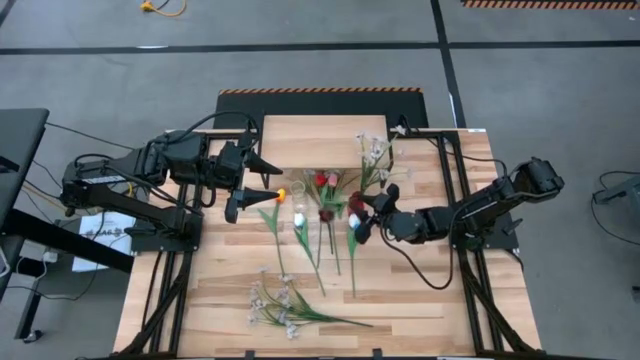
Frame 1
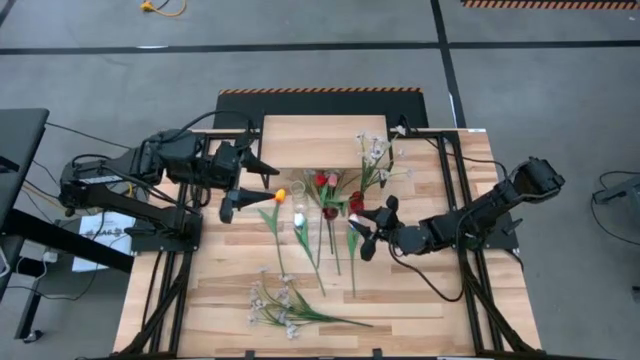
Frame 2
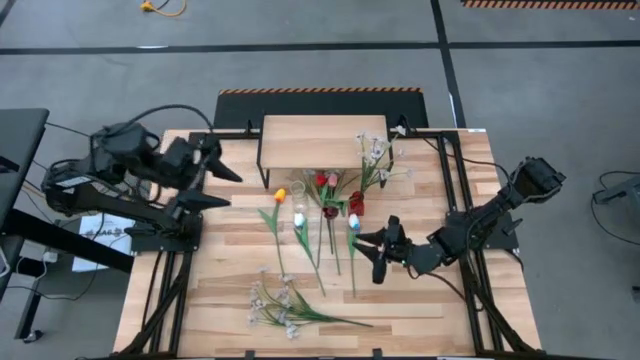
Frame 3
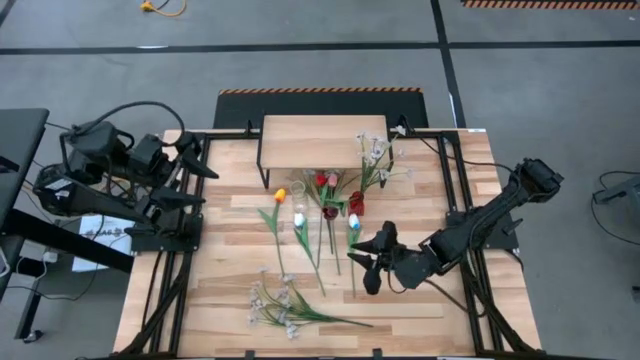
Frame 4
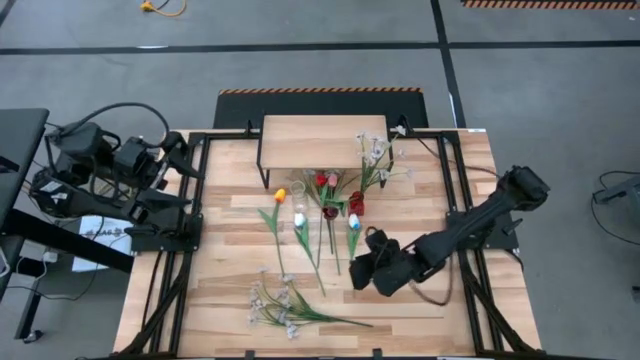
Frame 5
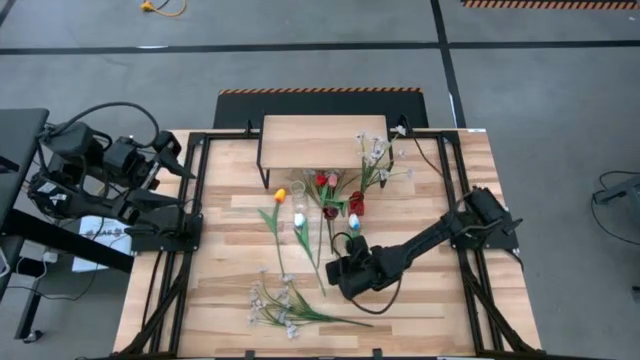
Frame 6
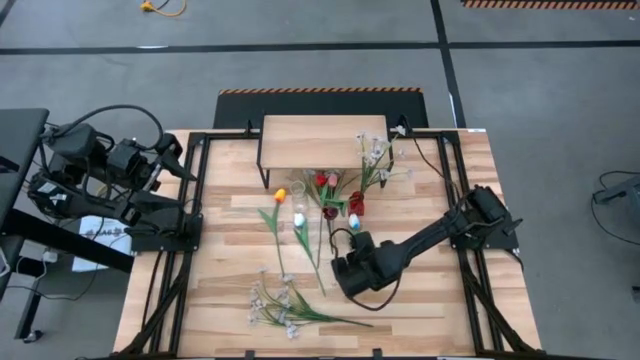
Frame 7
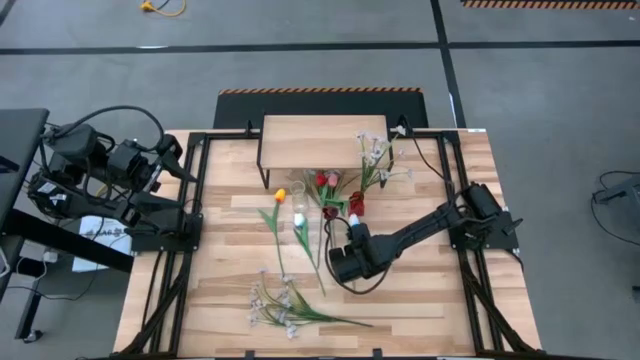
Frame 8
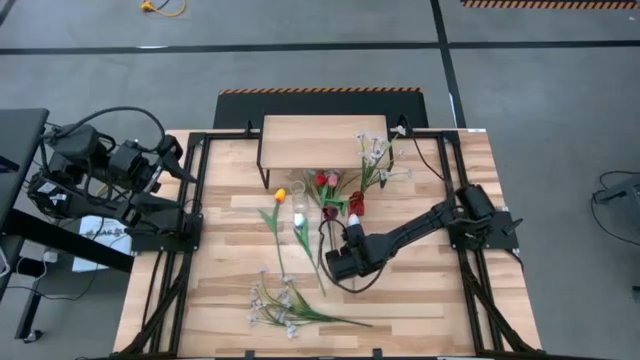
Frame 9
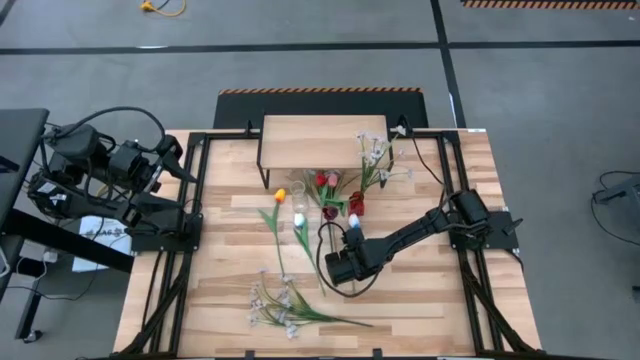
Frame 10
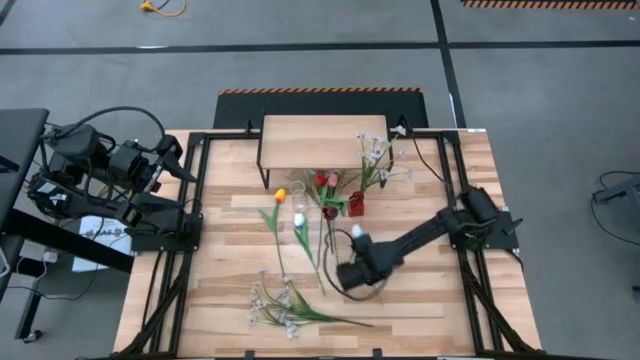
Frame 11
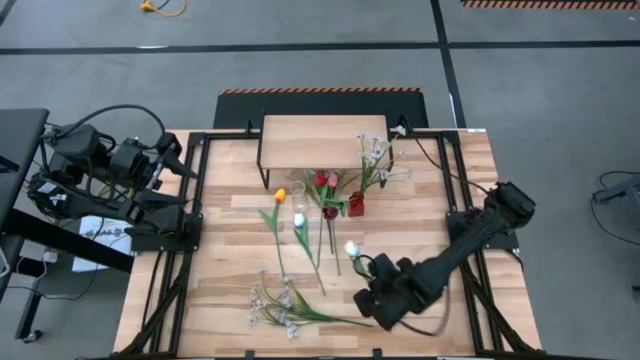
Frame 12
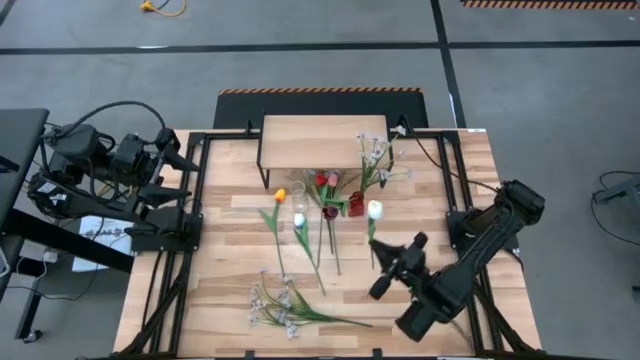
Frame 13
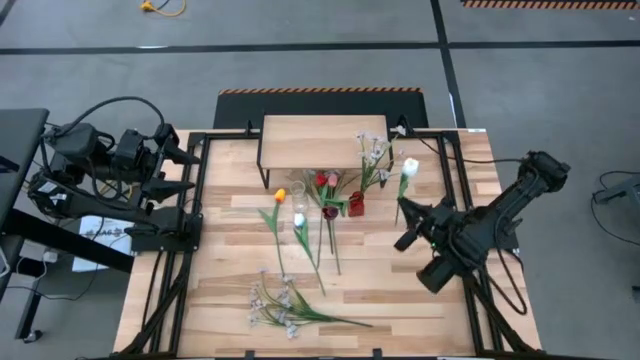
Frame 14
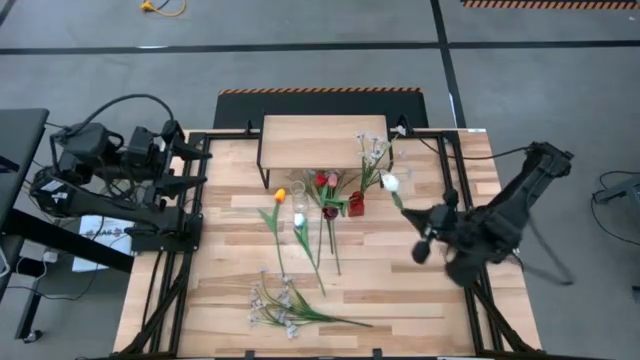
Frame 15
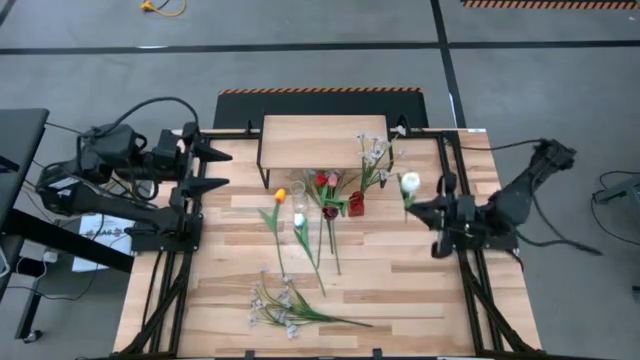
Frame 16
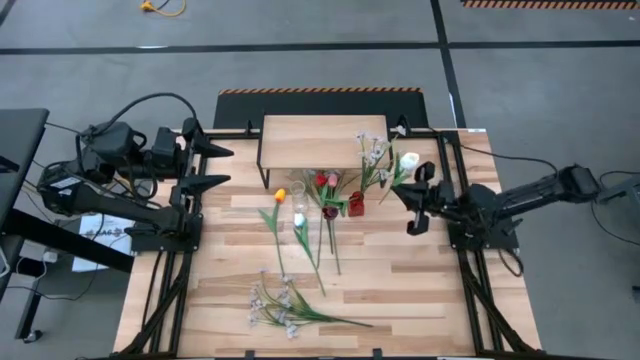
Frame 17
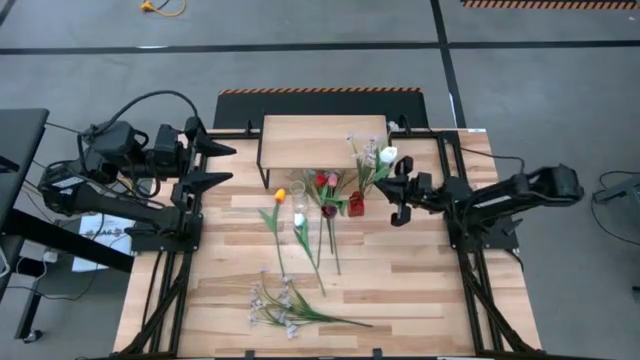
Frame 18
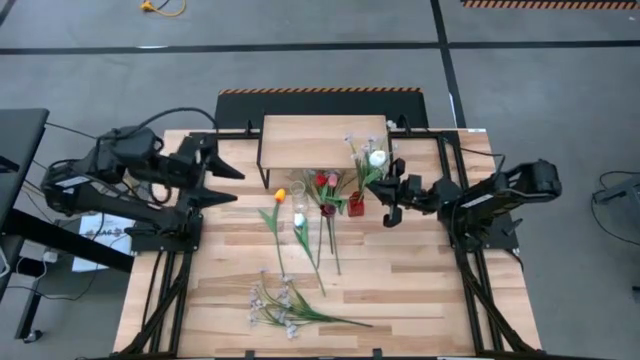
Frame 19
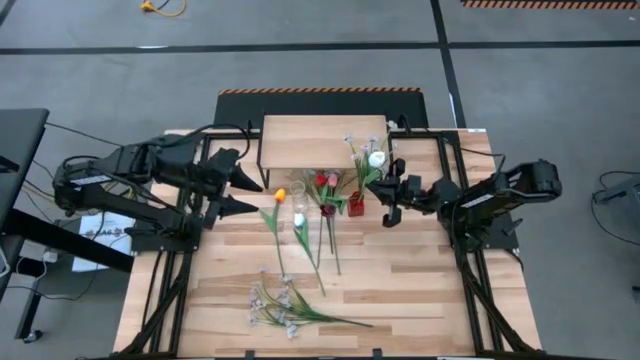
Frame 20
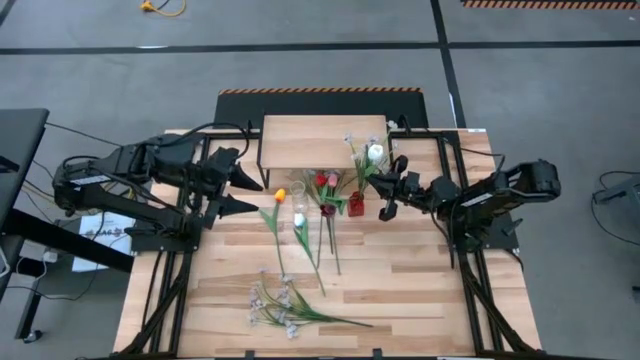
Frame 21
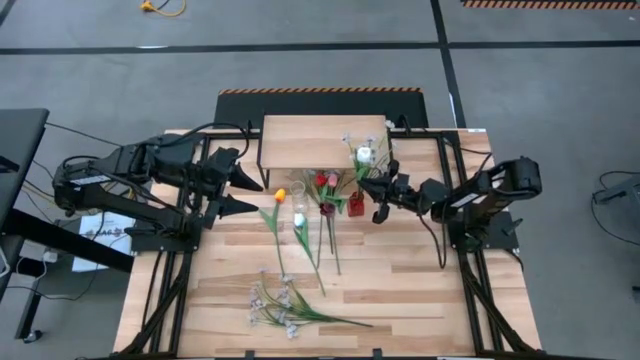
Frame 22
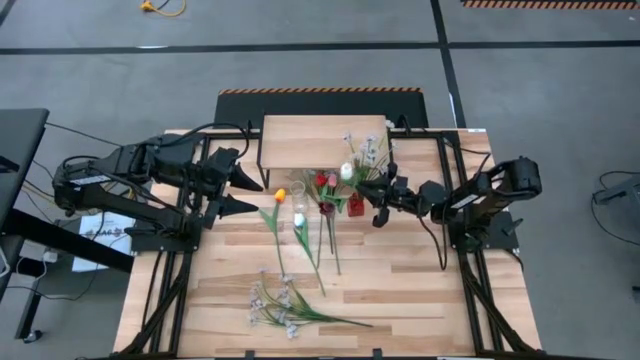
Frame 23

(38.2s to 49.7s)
Task: Pick and place flowers into a vace then onto a shelf
Put the right blue flower into the red vase

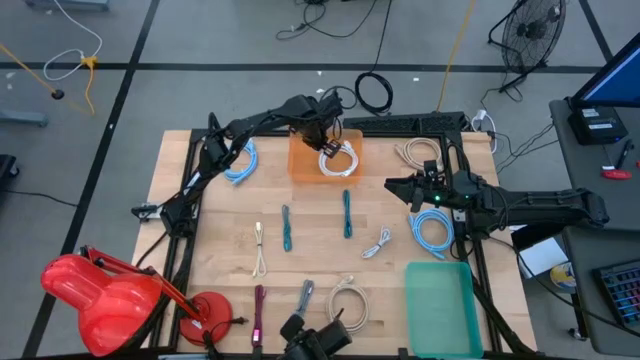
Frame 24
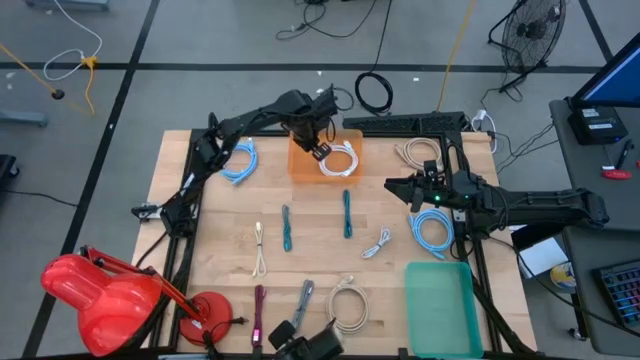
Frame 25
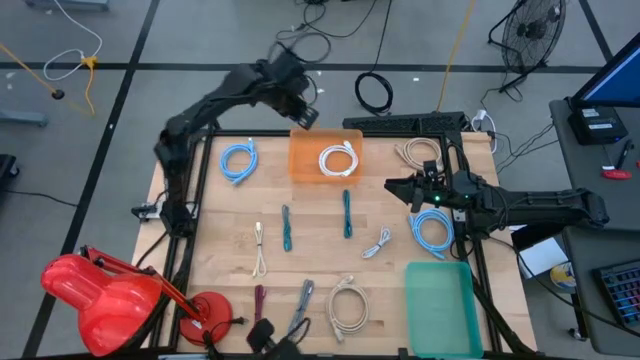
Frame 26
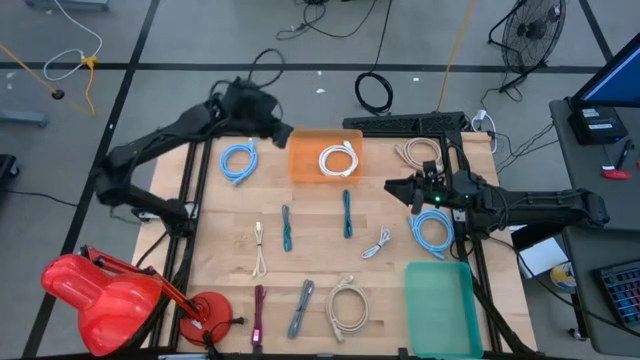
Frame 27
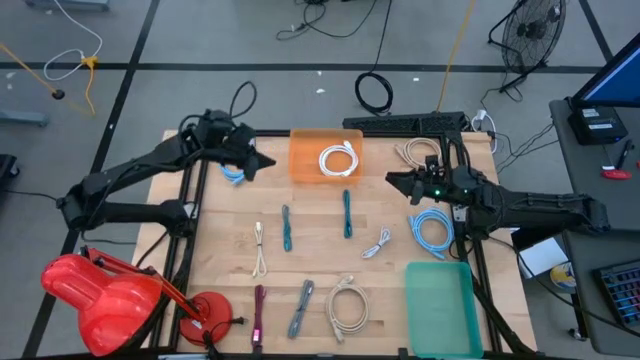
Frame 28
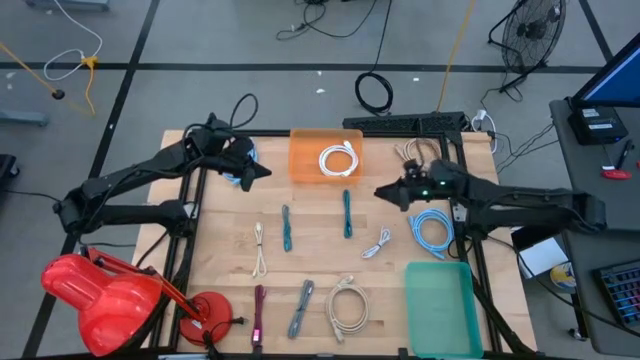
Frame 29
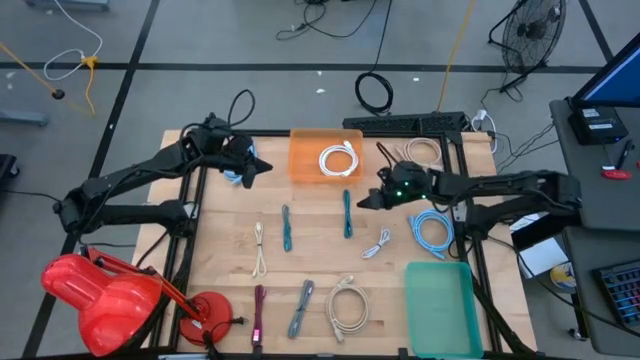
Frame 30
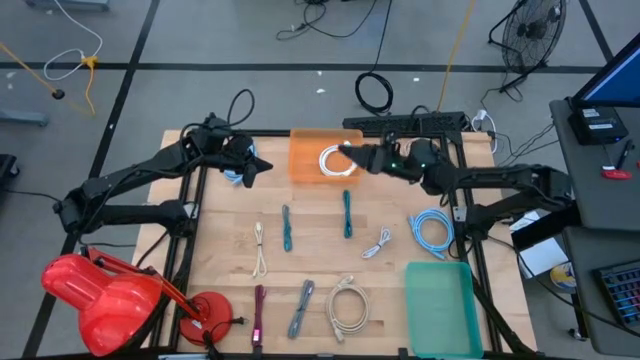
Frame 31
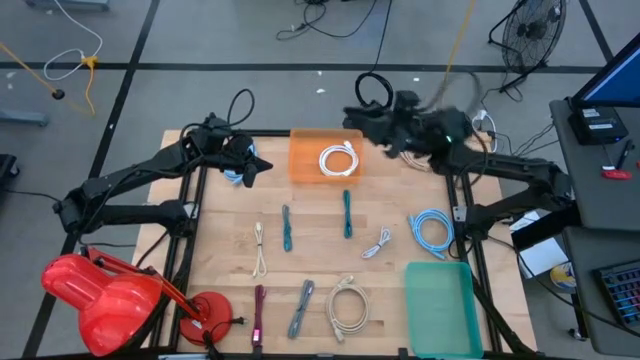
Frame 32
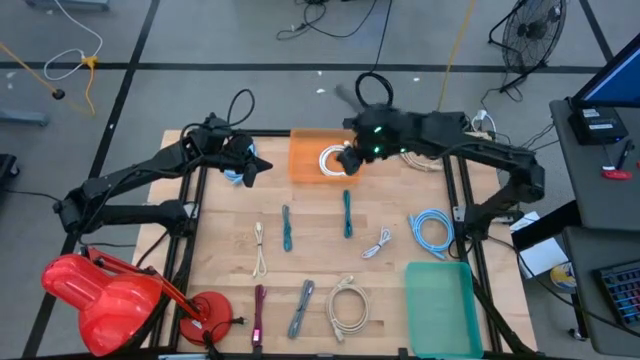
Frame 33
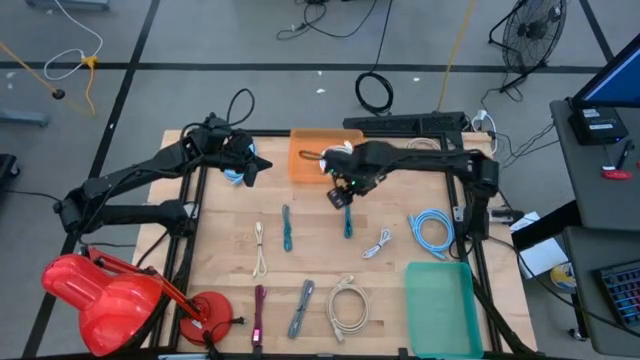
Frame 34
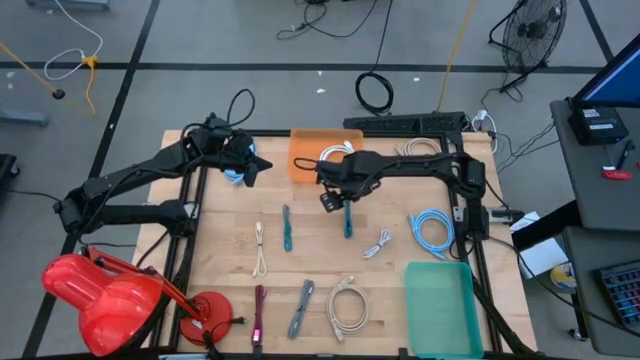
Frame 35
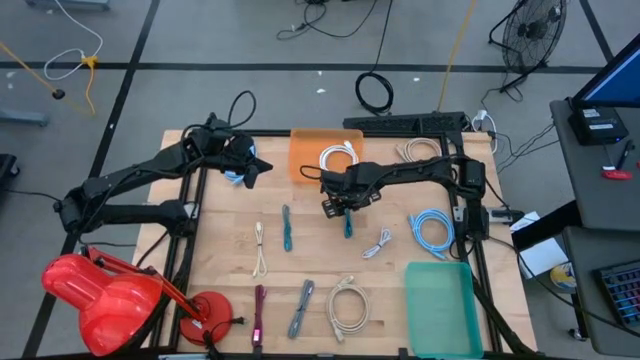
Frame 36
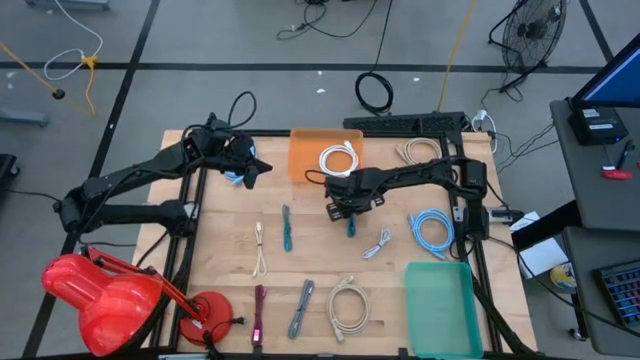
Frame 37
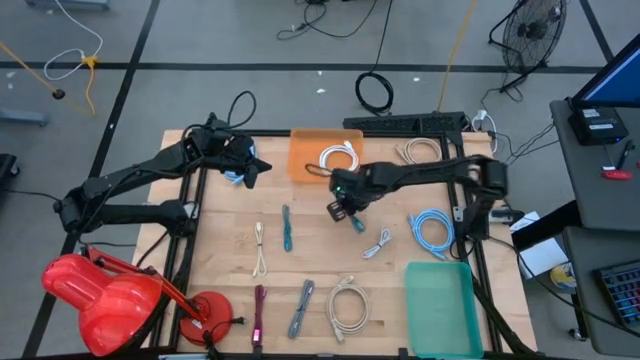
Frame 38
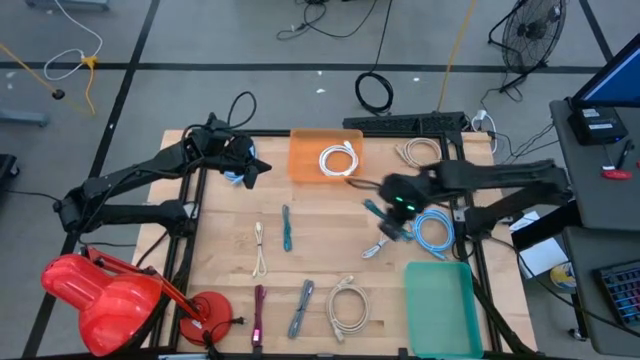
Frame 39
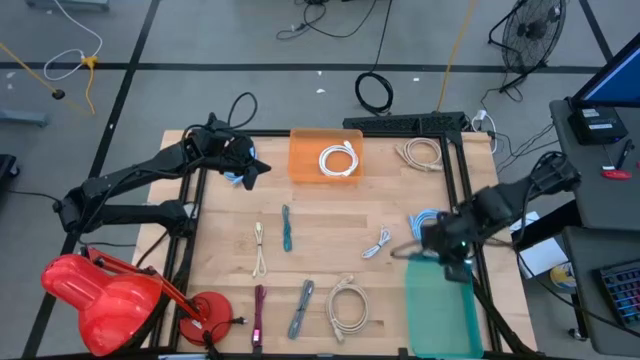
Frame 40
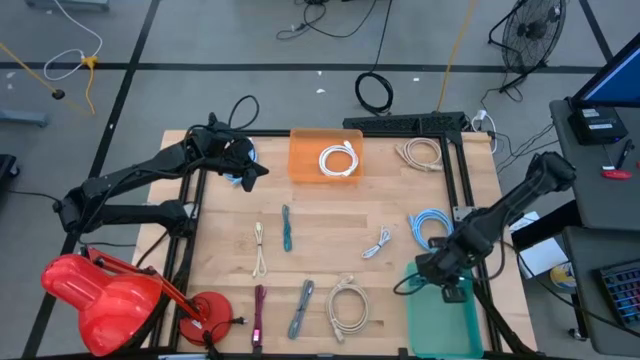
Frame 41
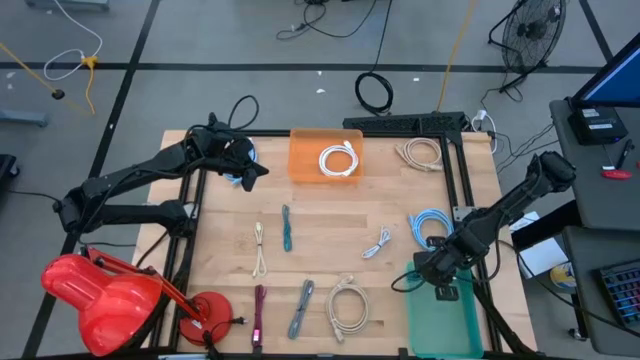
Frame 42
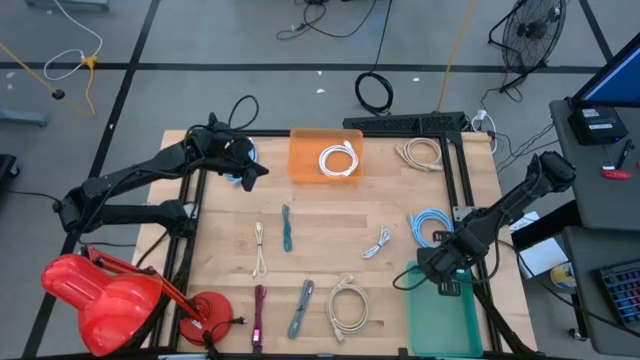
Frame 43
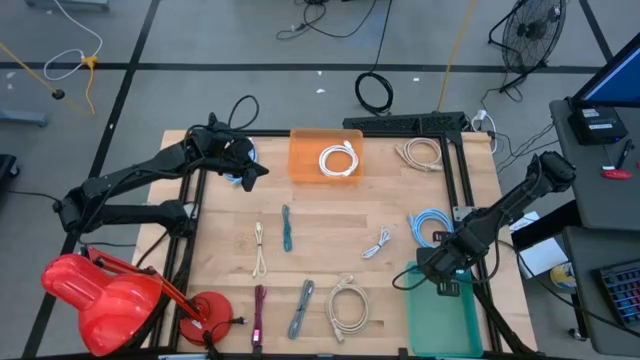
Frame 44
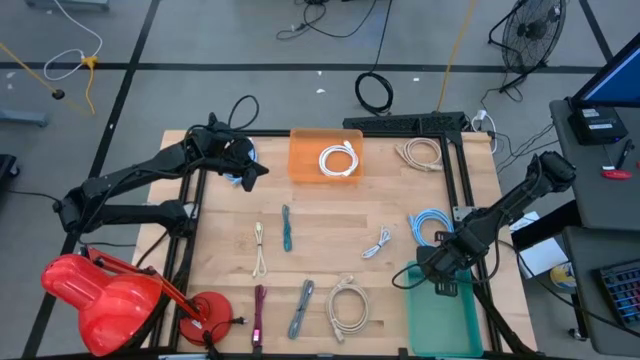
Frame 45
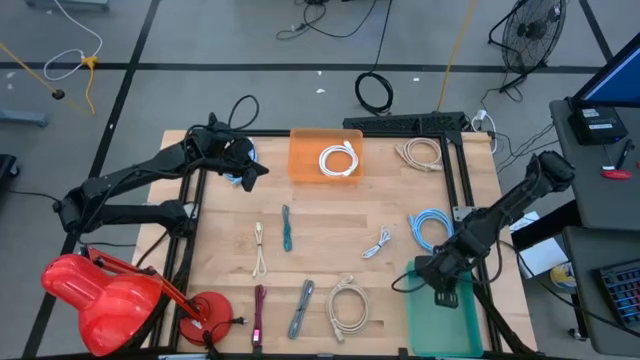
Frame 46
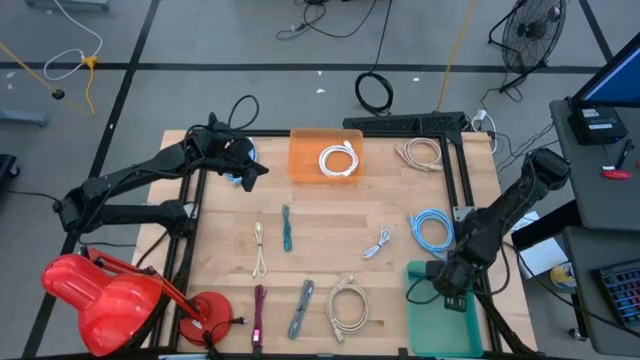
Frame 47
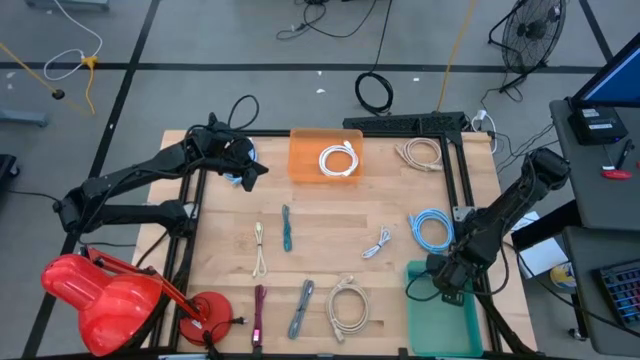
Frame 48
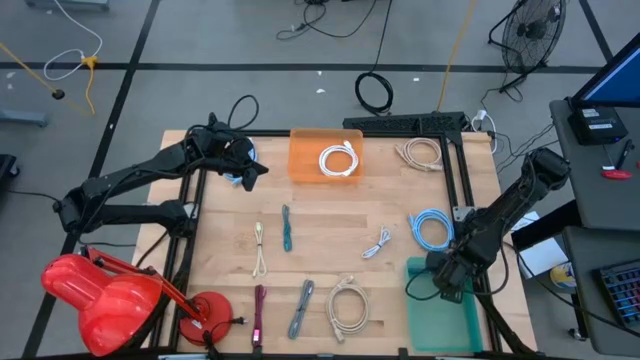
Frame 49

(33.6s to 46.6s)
Task: Pick & Place USB Port
Put the small right blue charger cable into the green bin
